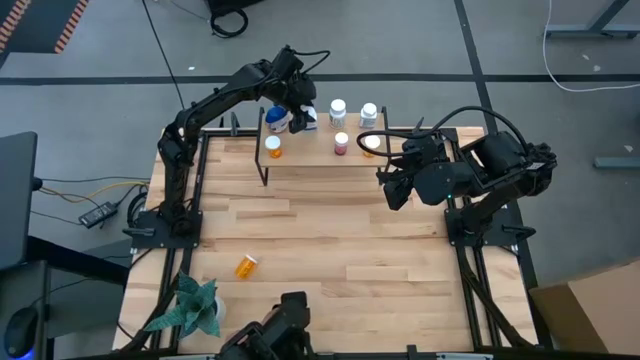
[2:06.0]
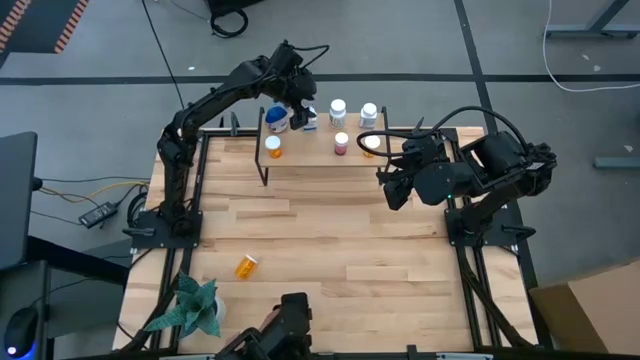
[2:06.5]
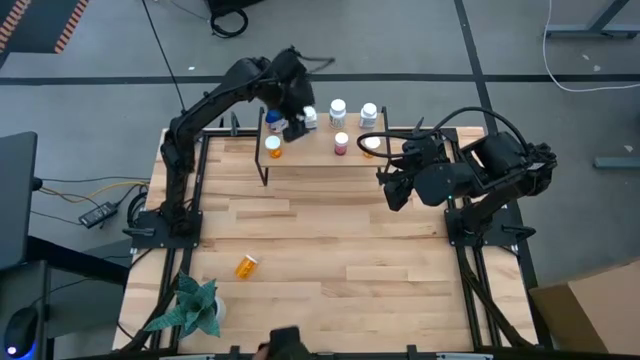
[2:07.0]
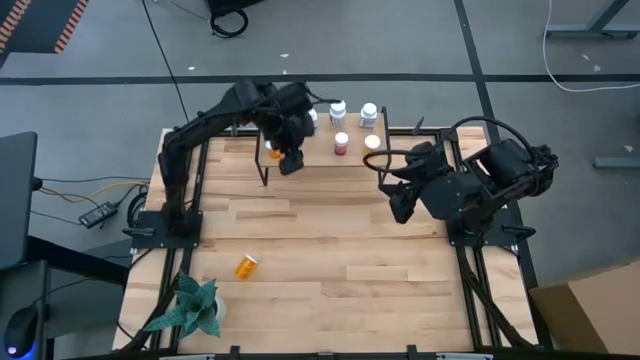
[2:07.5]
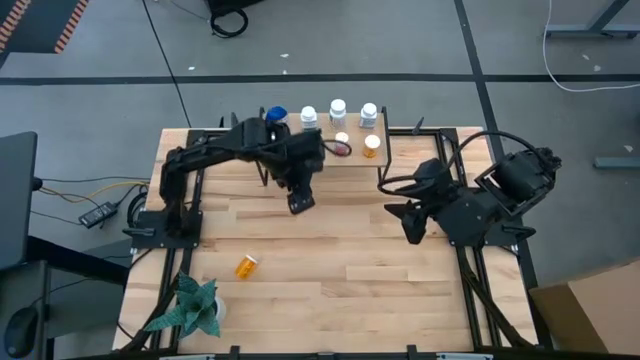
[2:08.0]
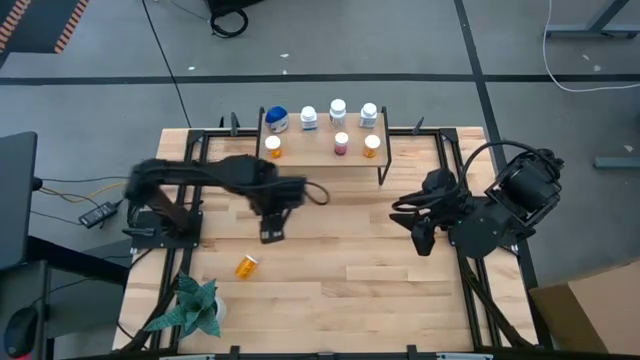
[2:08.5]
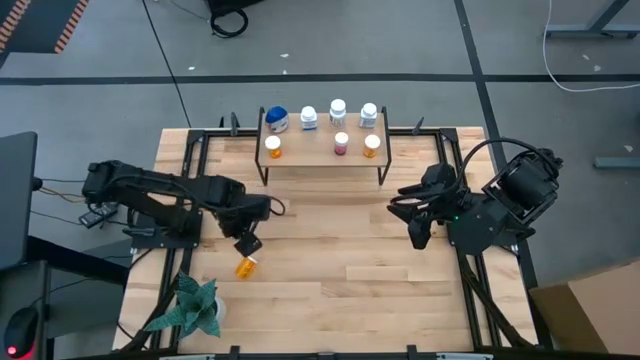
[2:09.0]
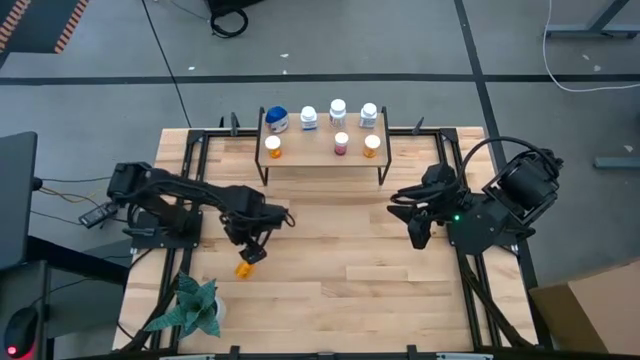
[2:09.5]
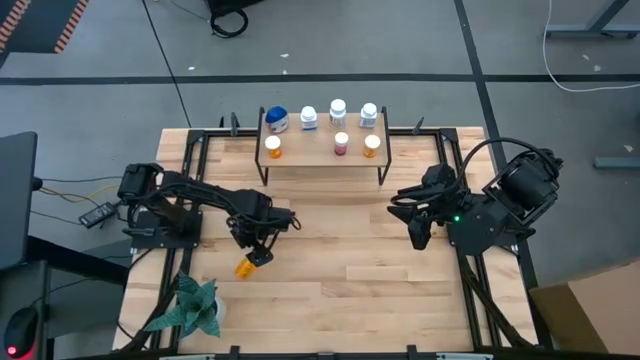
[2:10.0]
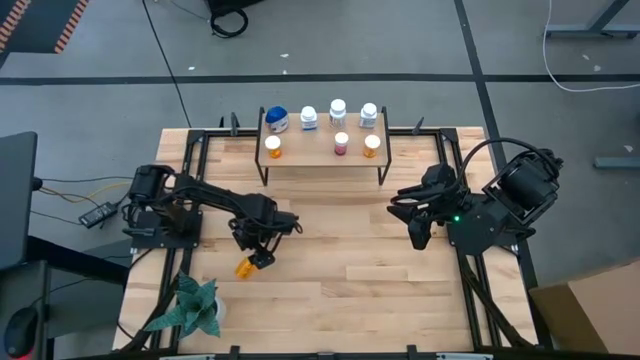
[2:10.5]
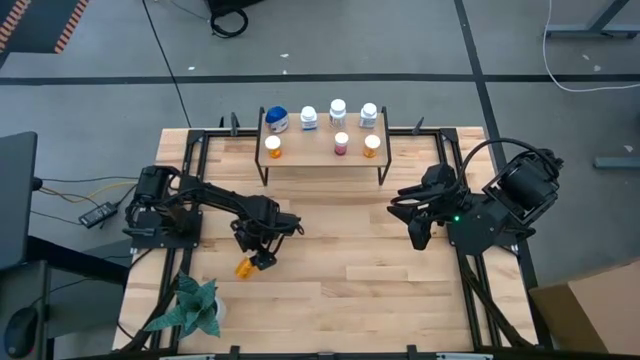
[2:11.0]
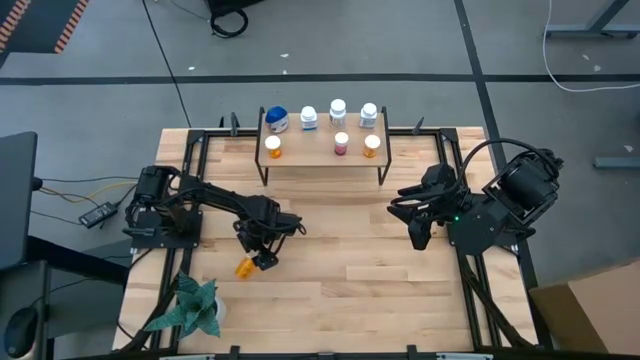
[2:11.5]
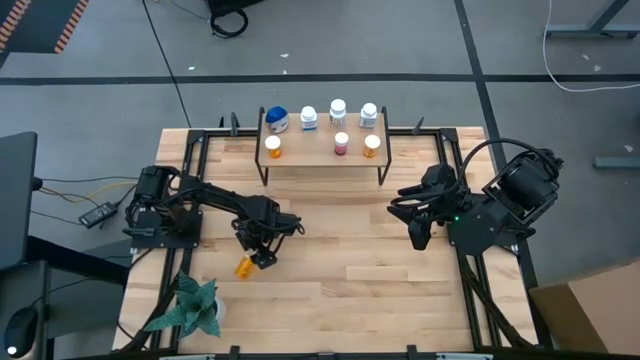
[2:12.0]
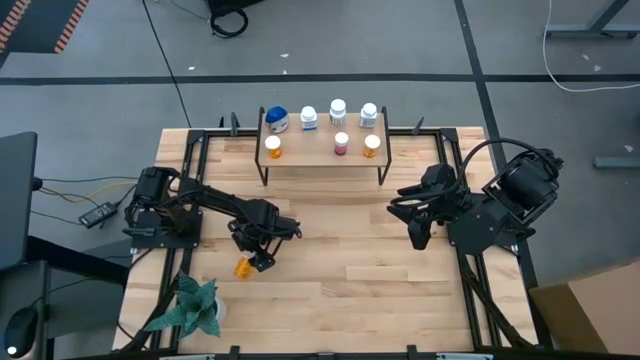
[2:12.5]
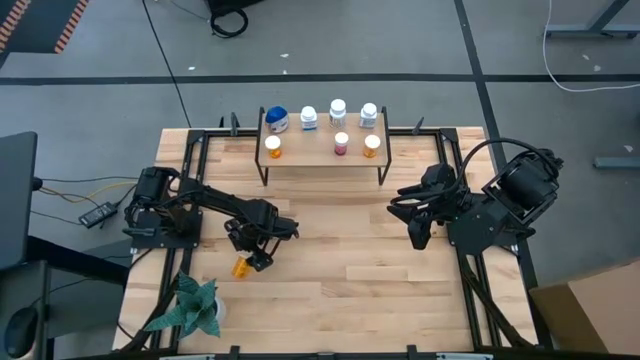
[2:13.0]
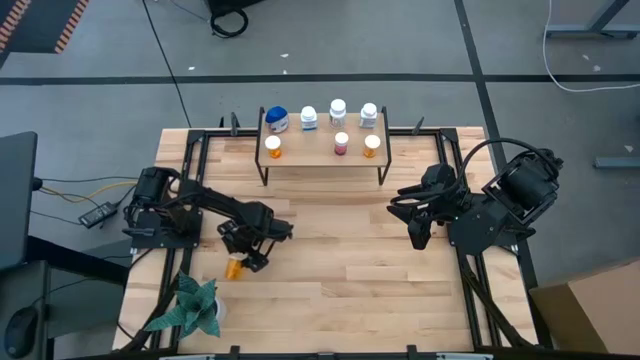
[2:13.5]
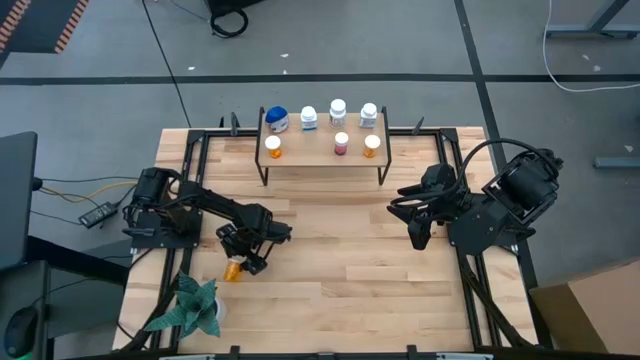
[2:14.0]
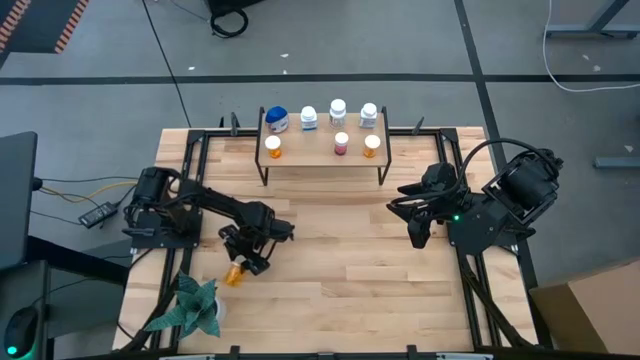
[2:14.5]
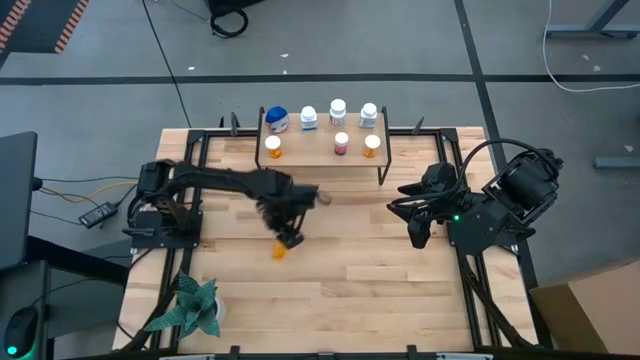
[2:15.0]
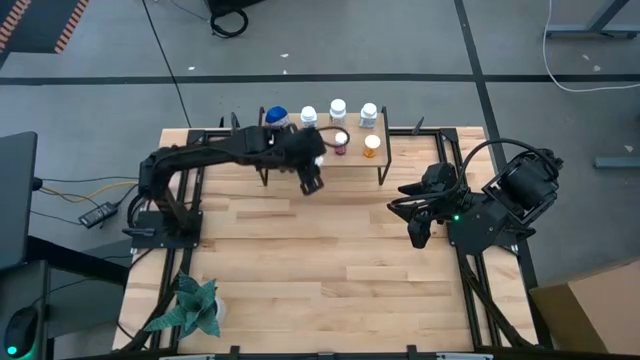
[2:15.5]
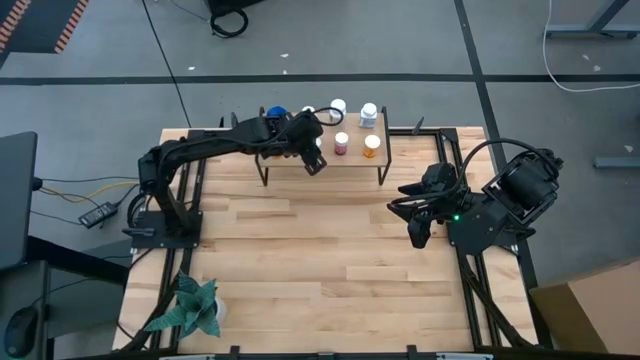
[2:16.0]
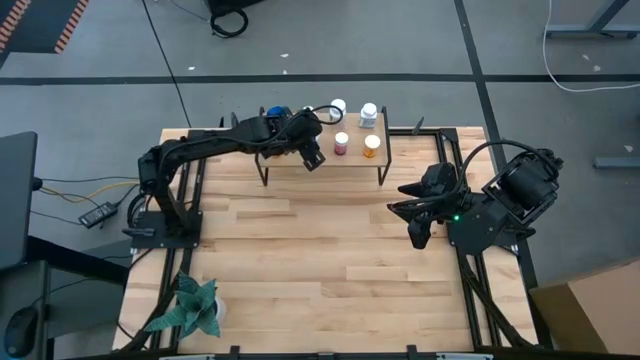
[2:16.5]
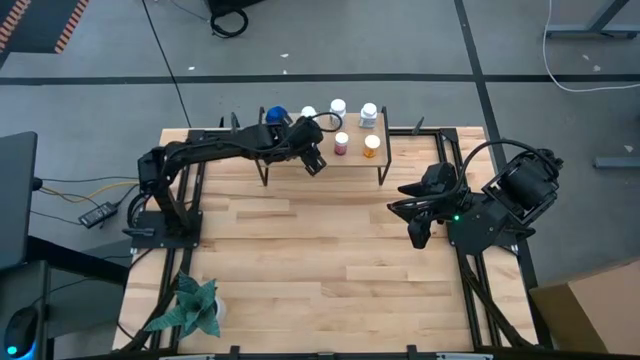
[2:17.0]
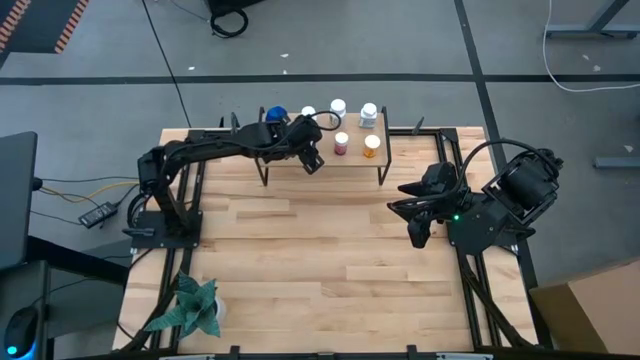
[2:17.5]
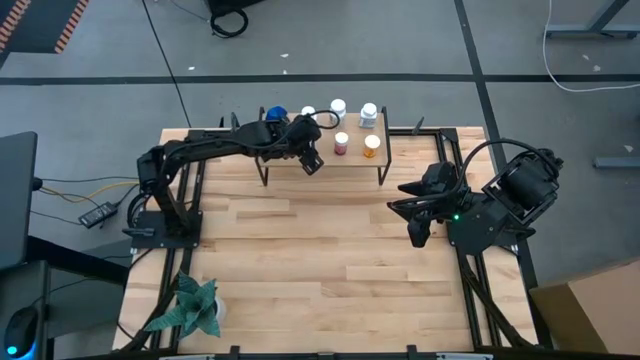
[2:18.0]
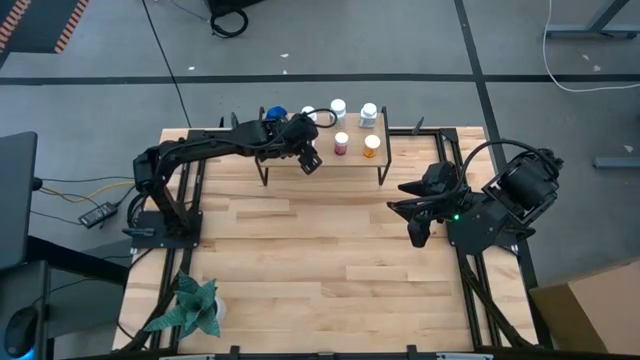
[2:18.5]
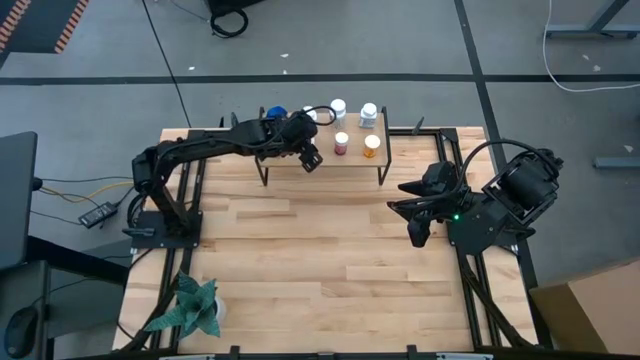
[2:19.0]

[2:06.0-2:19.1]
Task: Pick and place medicine bottles onto shelf by color
Put the orange pill bottle on the shelf

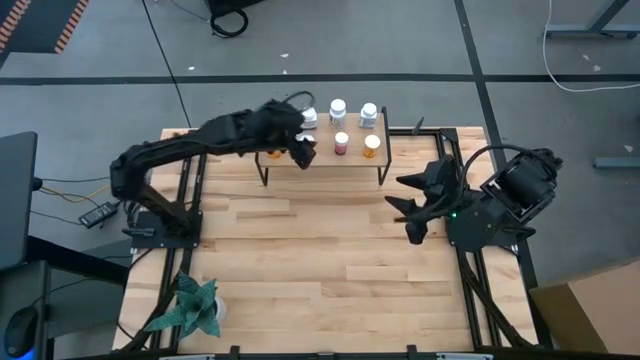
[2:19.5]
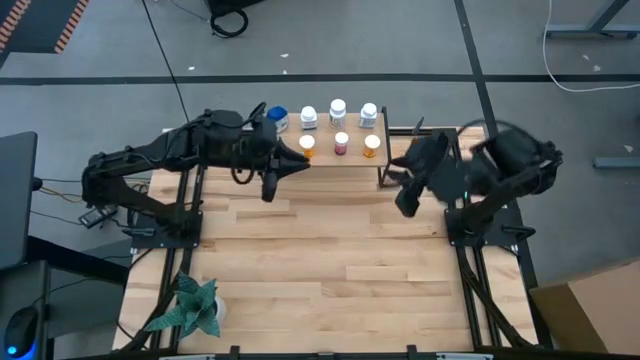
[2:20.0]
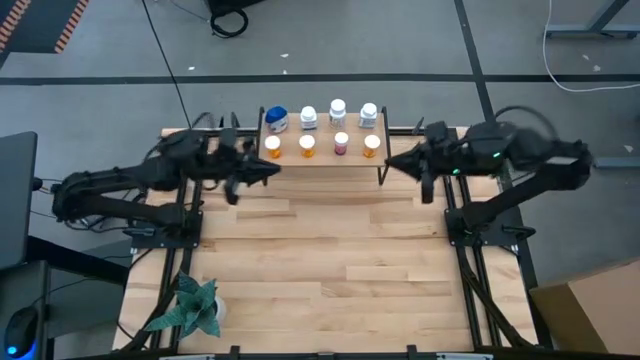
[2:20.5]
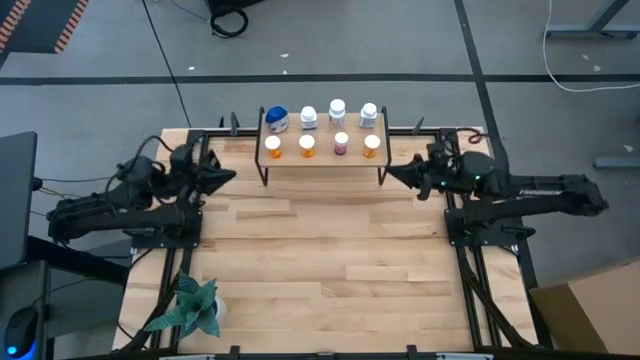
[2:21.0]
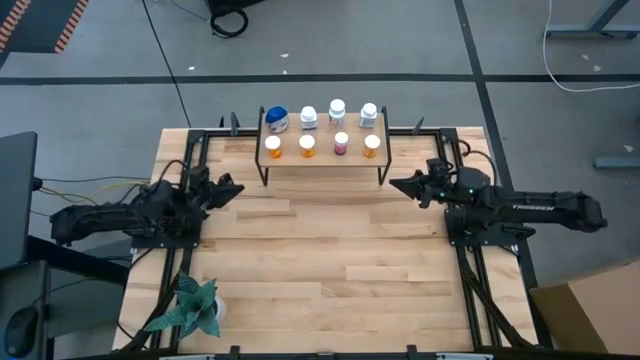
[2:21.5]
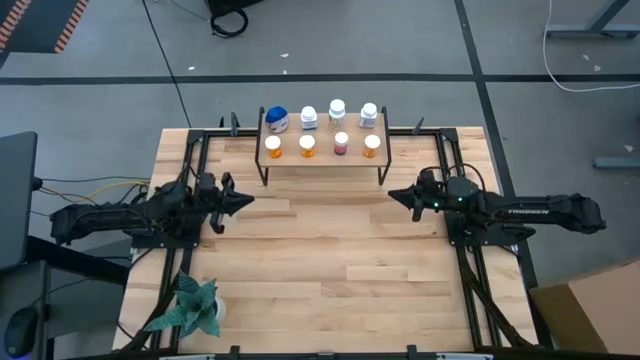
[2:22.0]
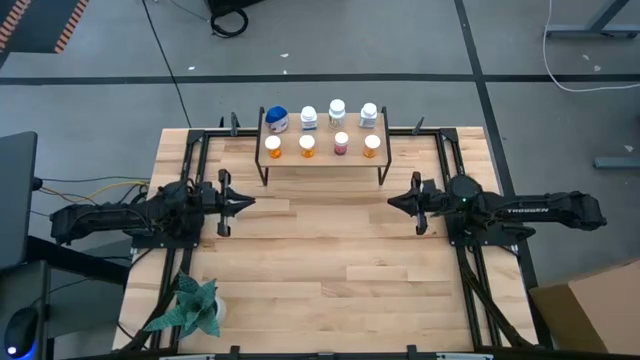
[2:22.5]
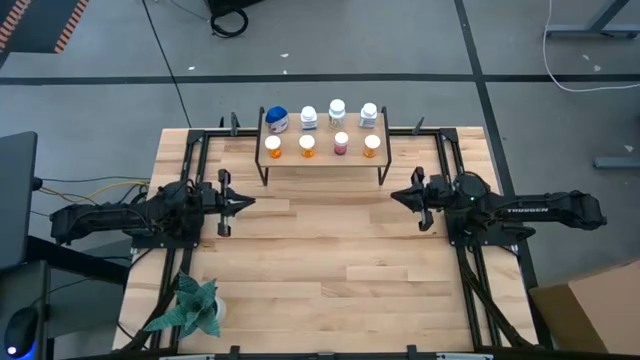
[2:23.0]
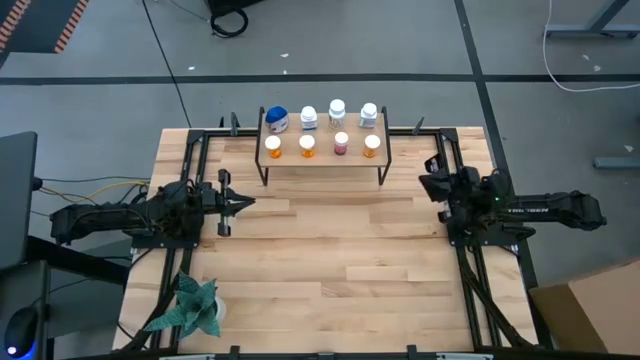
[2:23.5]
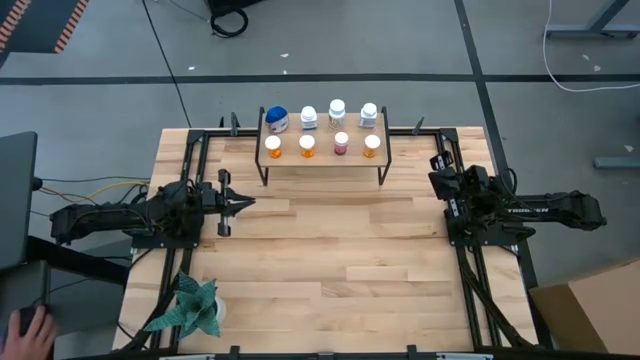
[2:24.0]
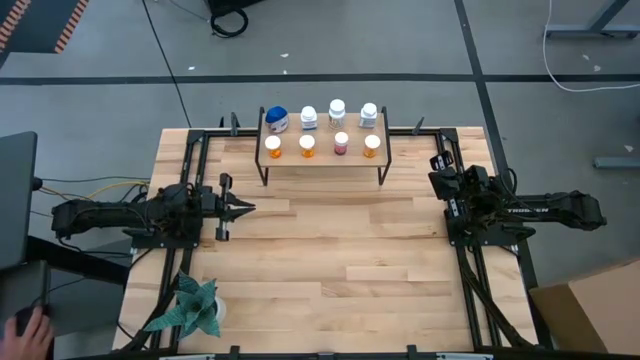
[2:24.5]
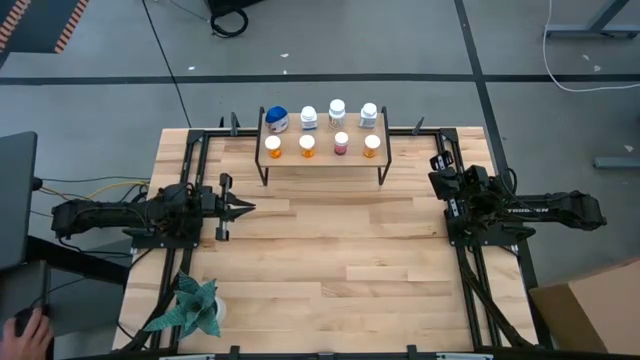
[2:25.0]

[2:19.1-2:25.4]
Return to Home Position

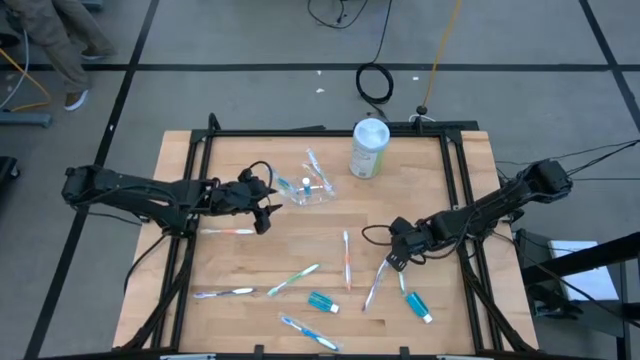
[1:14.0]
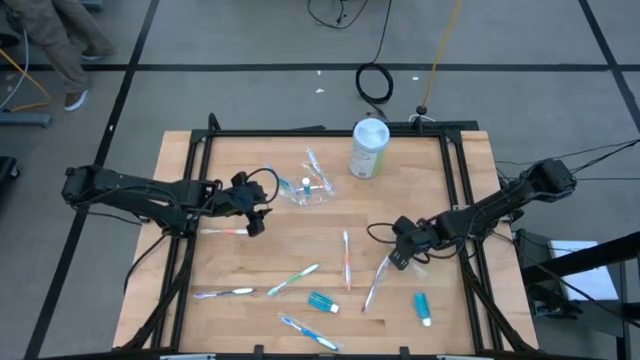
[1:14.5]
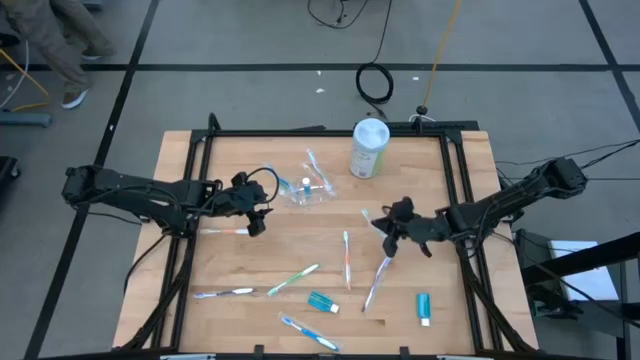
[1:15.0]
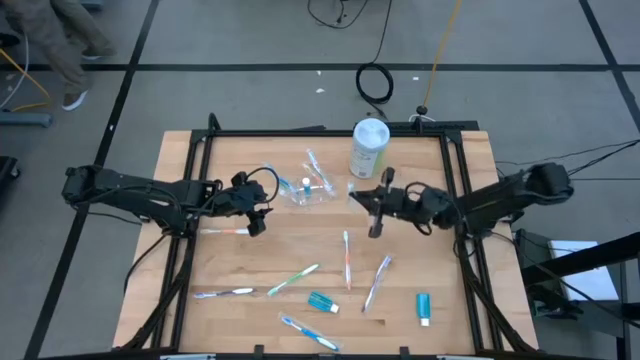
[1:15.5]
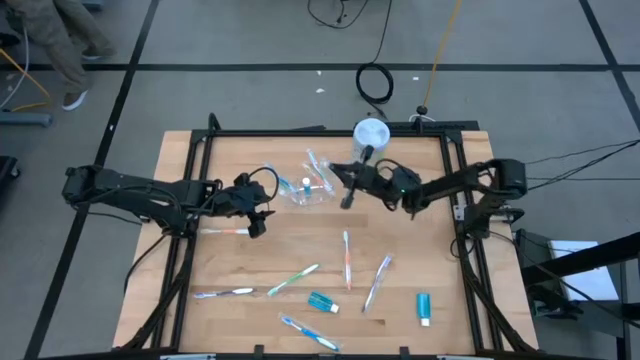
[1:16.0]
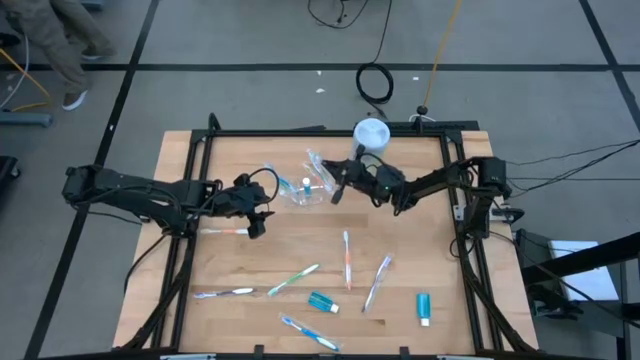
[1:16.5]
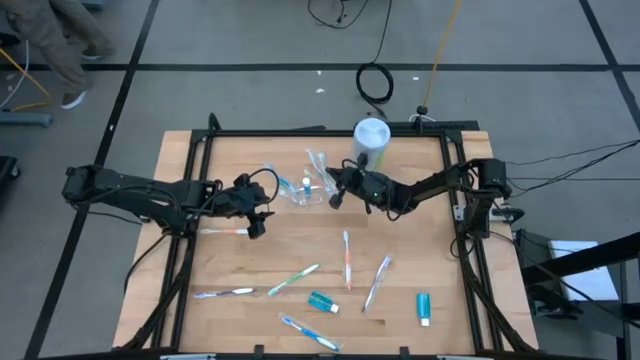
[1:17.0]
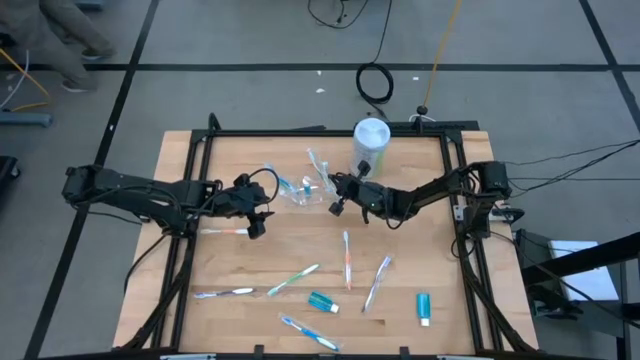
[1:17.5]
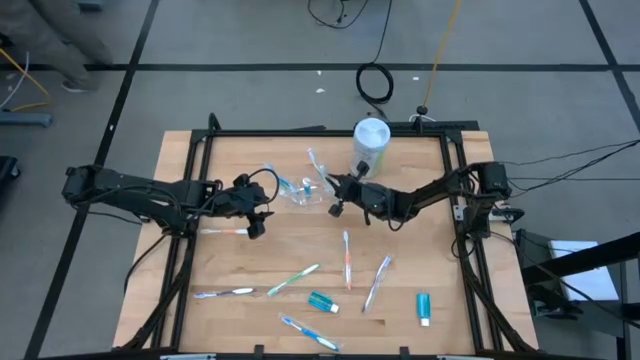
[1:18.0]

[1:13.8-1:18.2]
Task: Pick & Place toothbrushing station
Put the green toothbrush into the transparent organizer
